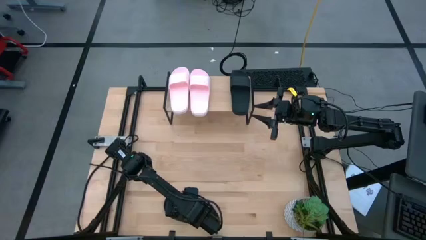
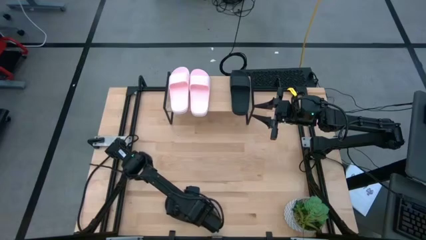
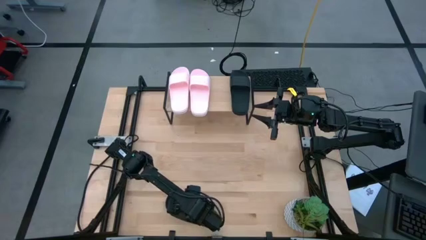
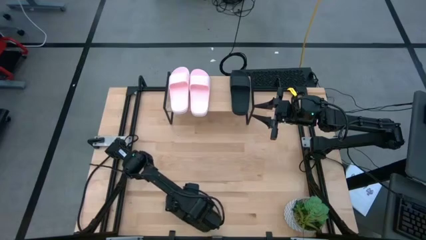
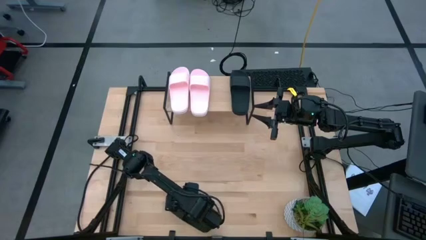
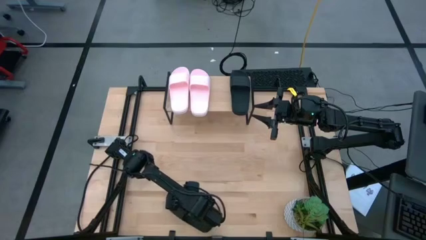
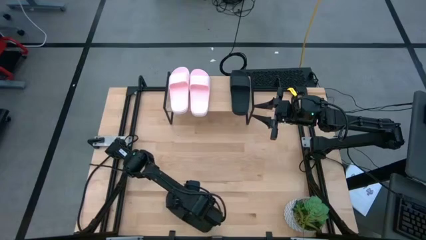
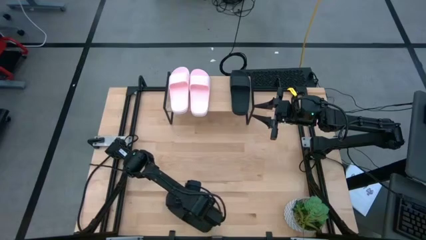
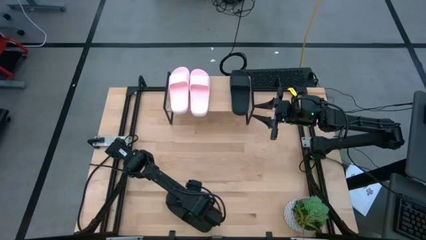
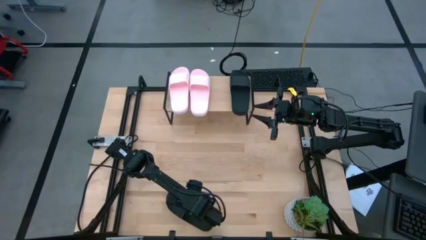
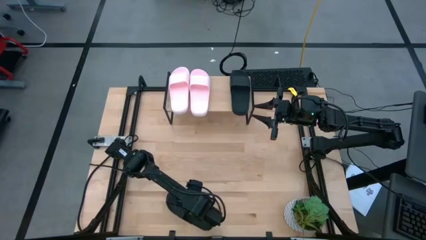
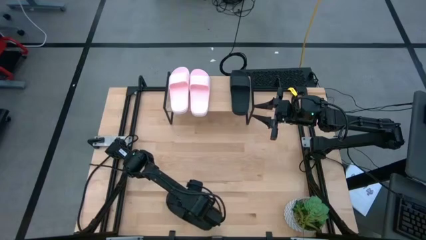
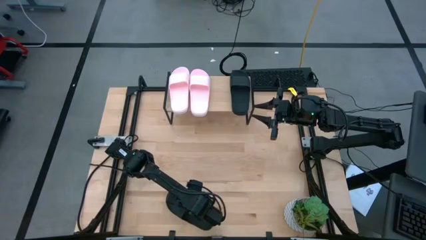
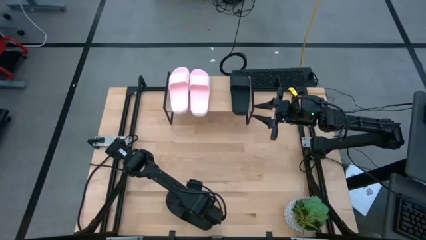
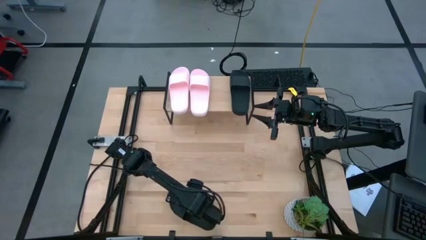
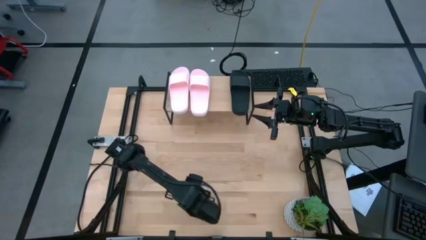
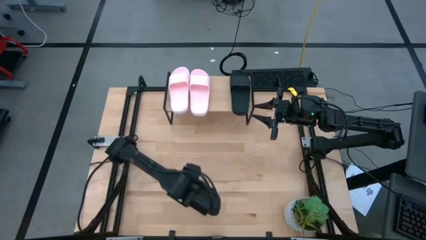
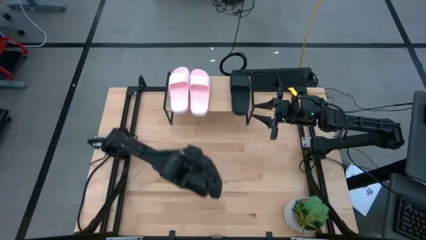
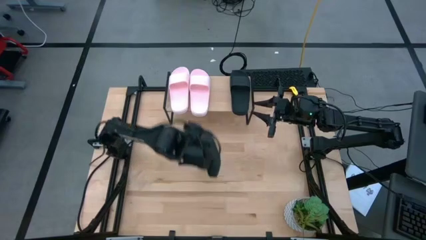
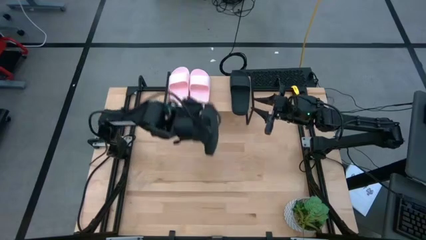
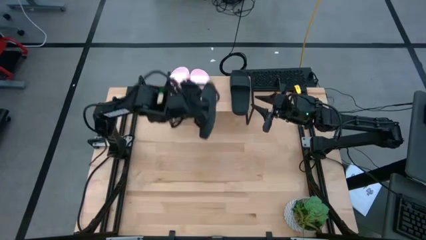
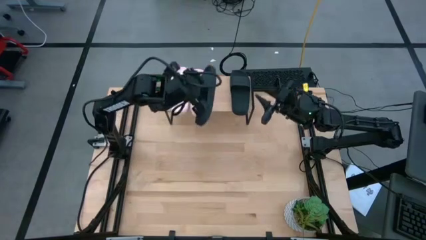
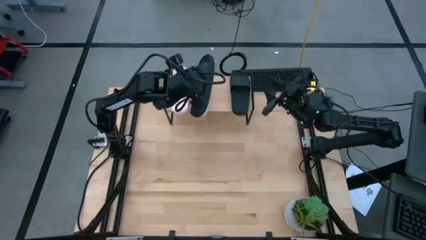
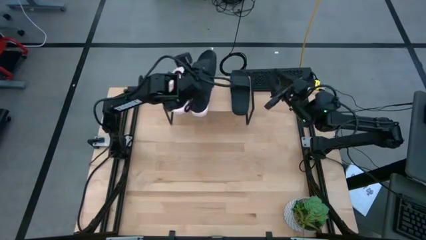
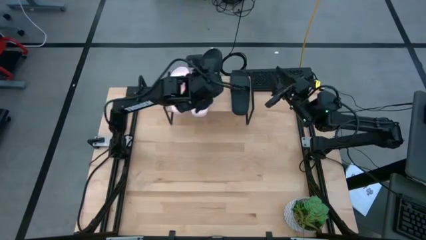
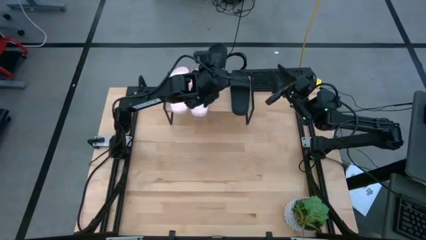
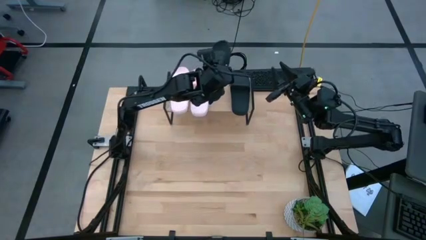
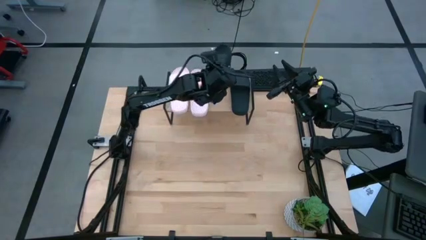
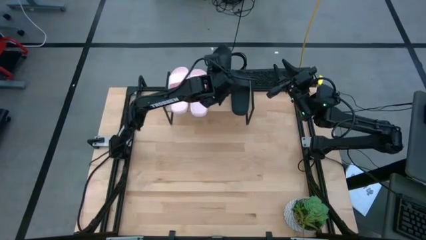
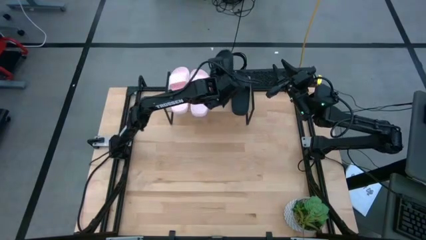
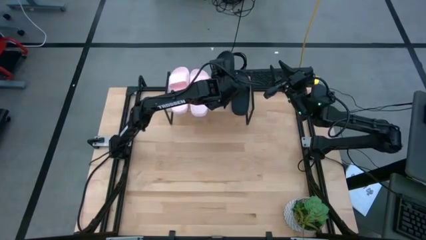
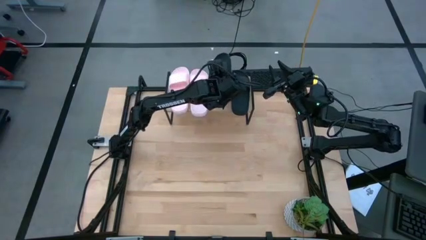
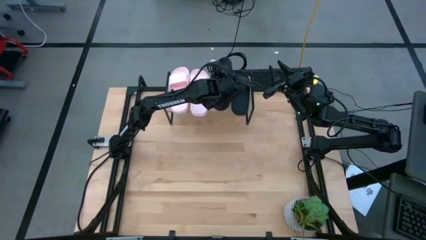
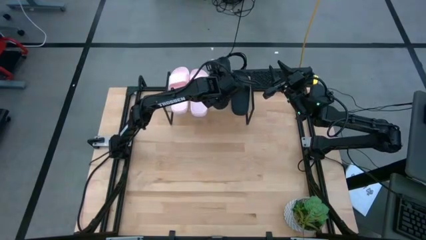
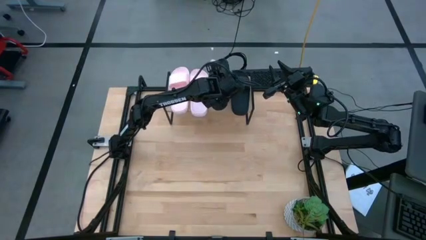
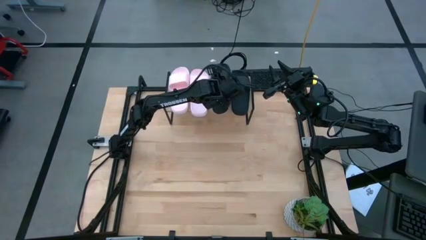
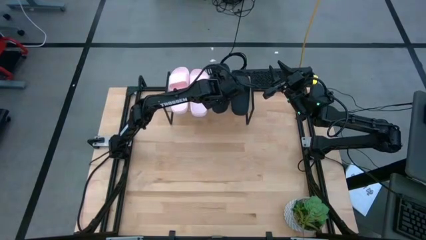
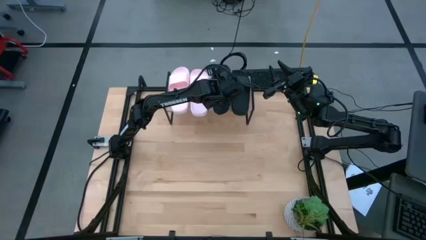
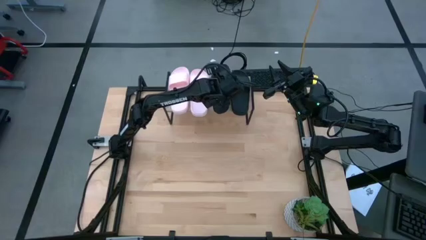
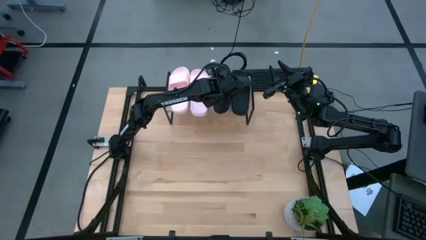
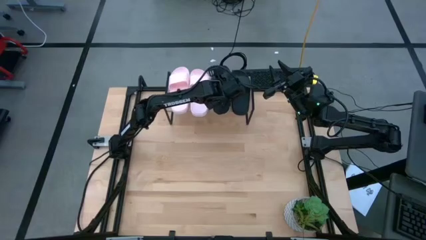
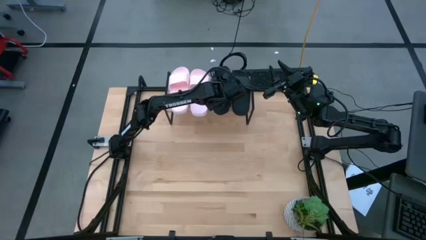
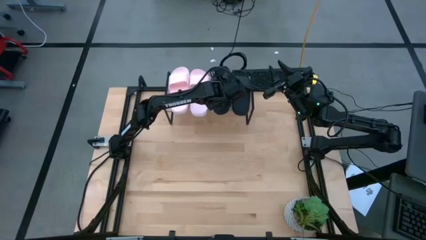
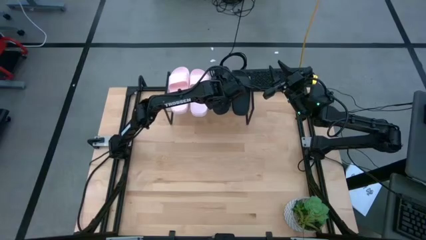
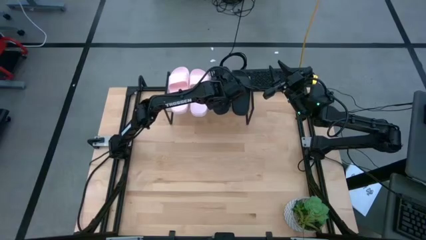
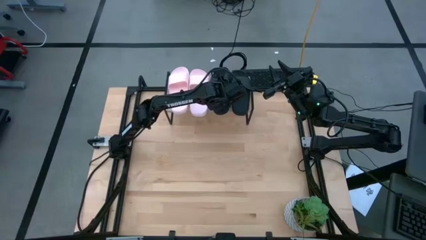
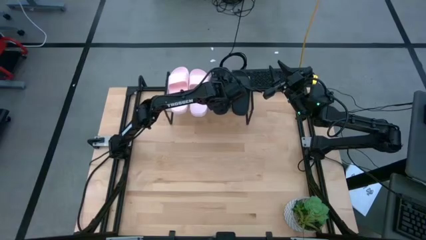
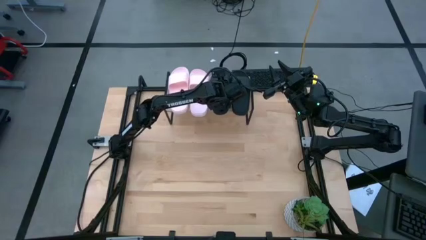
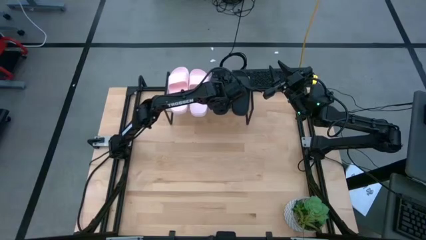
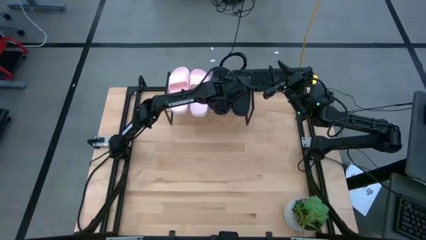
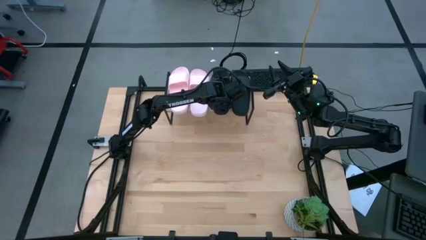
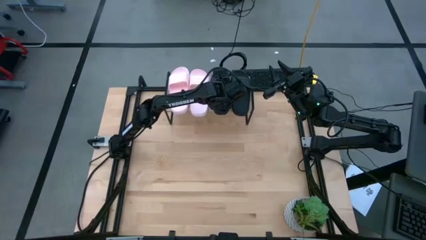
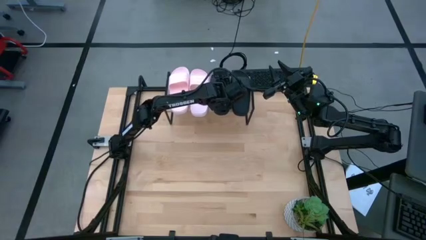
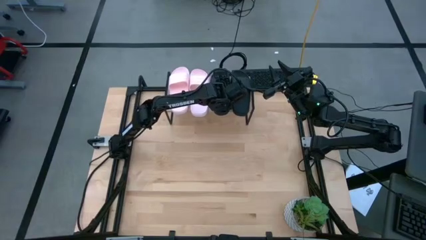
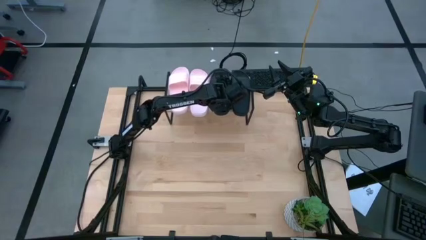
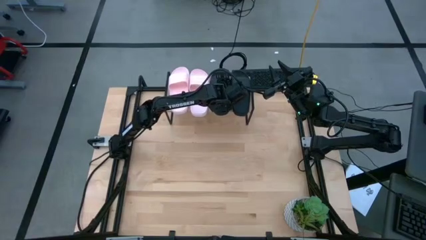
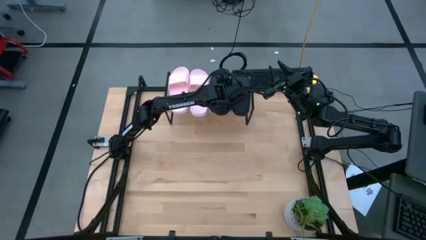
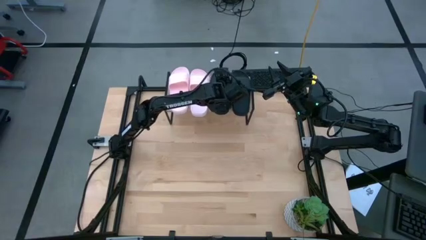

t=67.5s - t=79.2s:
Task: Pick and place slides into the shelf
Put the black slide on the shelf

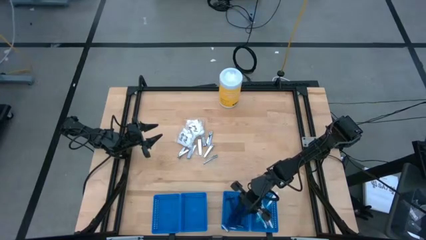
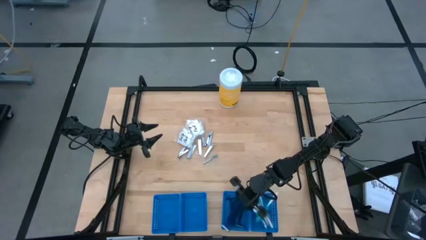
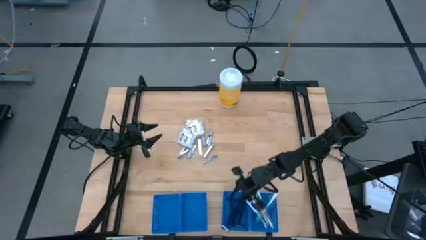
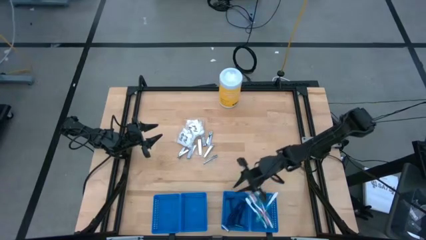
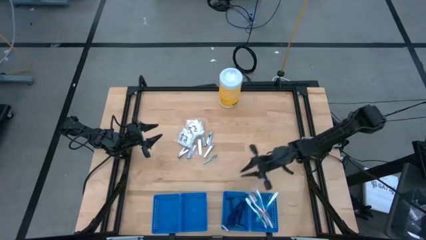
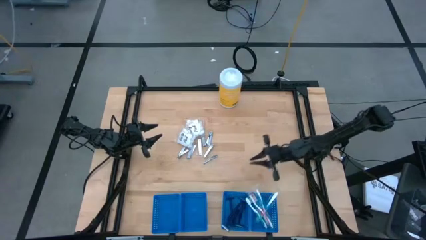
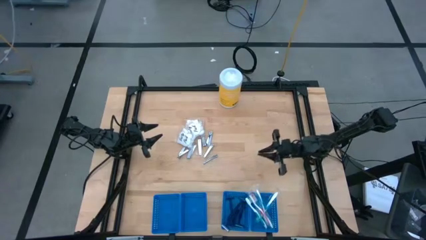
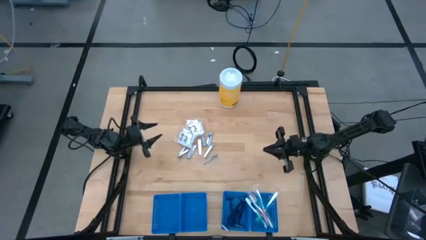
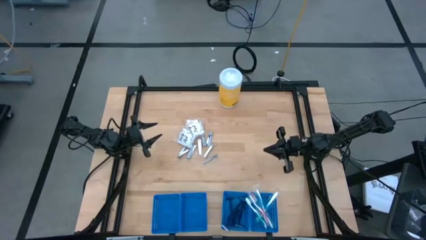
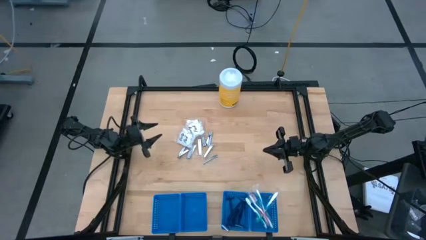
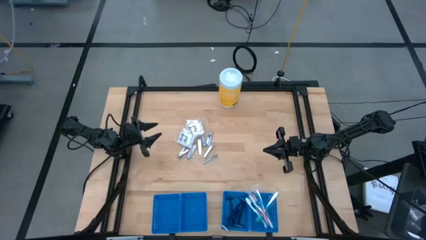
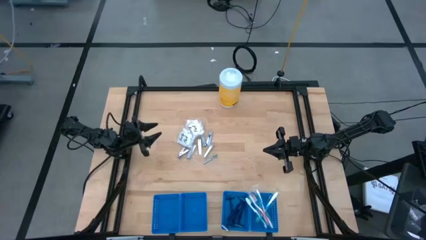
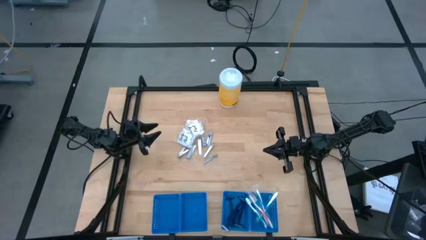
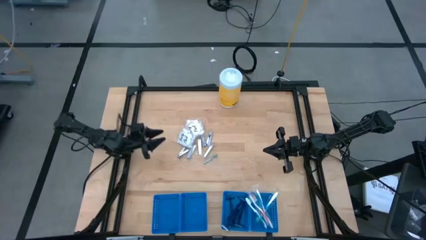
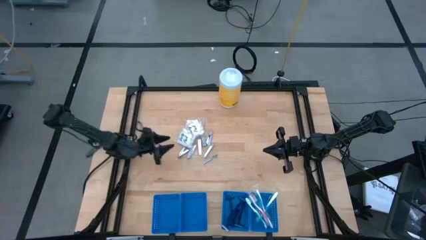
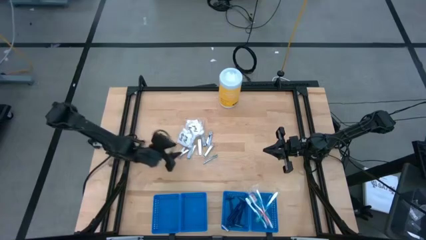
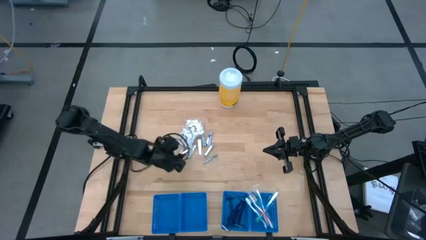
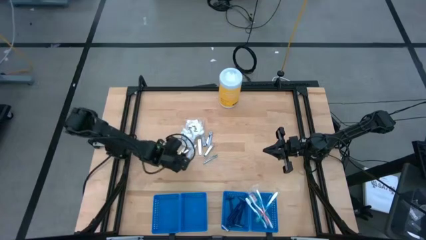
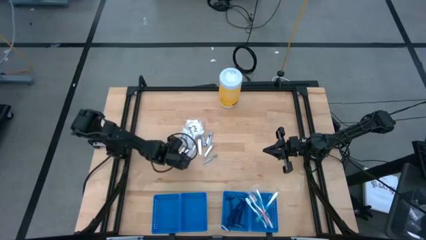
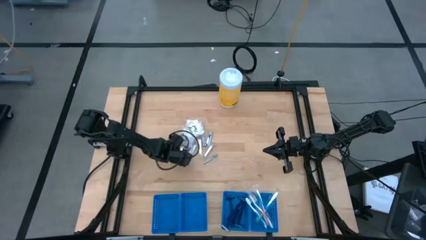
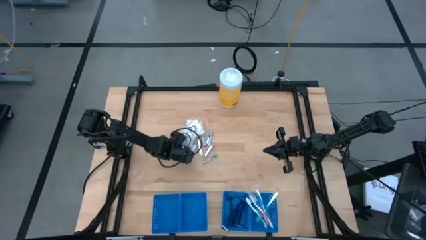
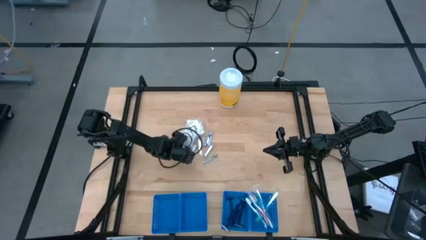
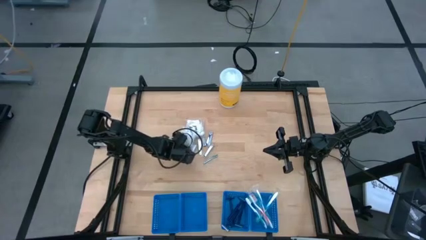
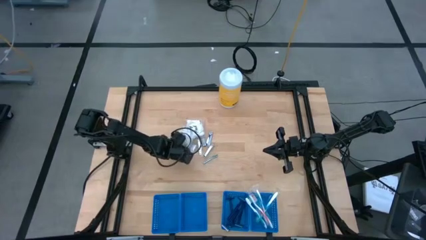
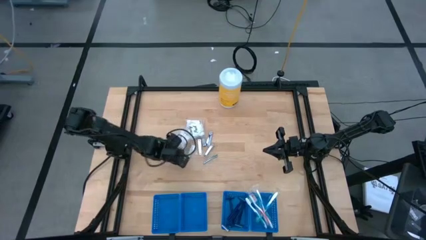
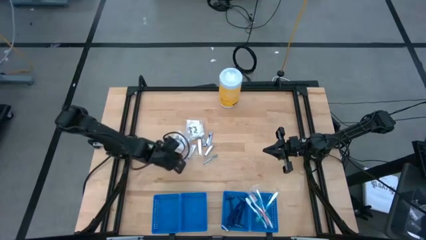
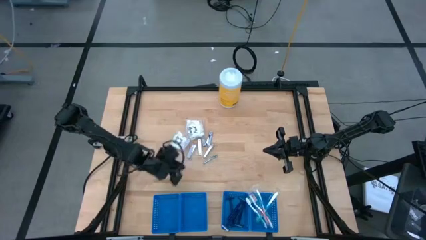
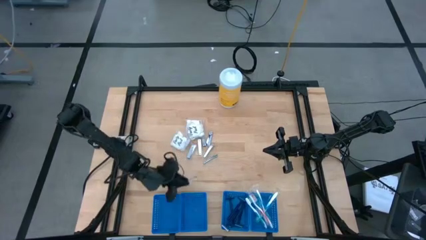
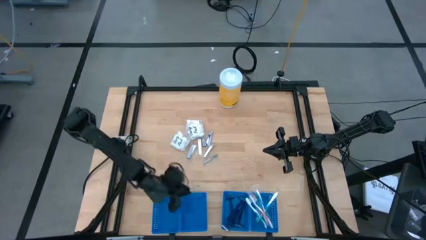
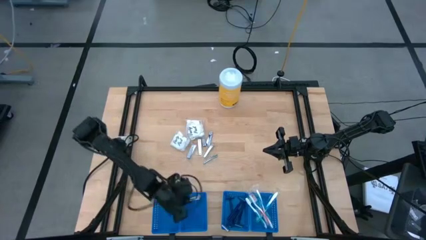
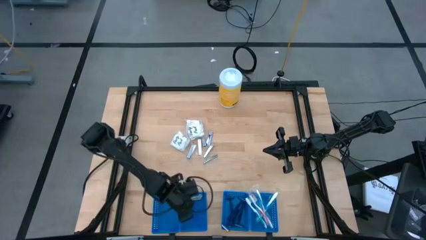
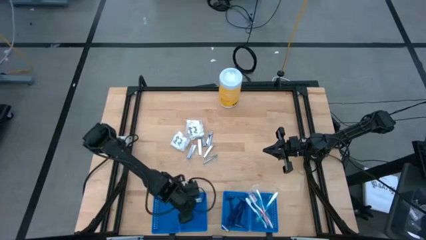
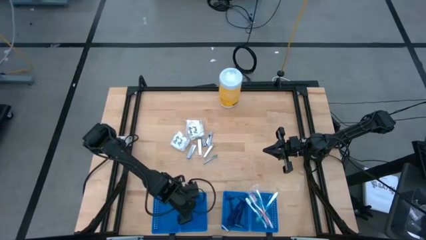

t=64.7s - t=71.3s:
Task: Pick & Place Travel size toiletries
Put the silver nail cutter into the blue basket
